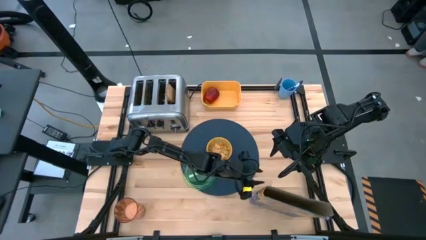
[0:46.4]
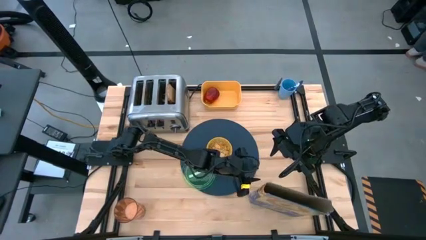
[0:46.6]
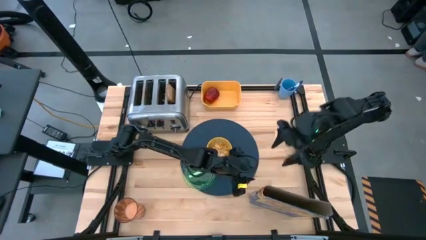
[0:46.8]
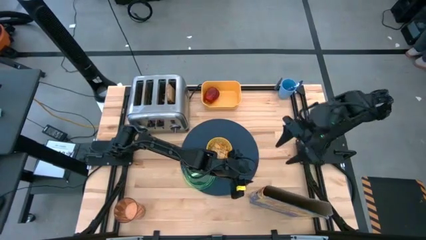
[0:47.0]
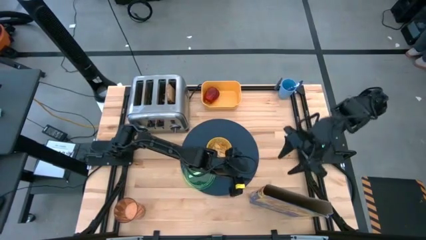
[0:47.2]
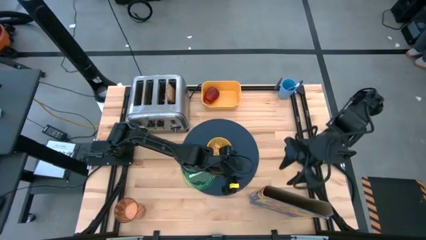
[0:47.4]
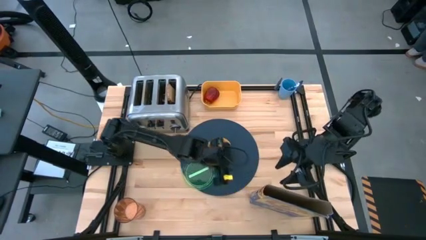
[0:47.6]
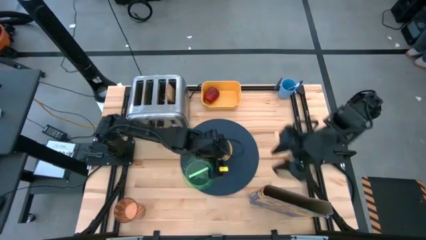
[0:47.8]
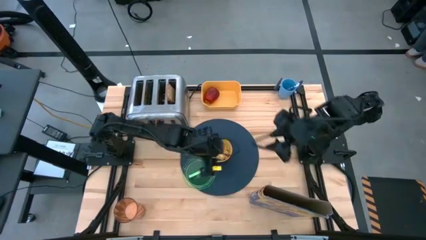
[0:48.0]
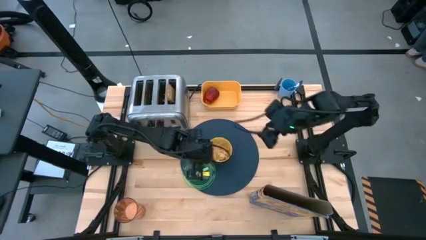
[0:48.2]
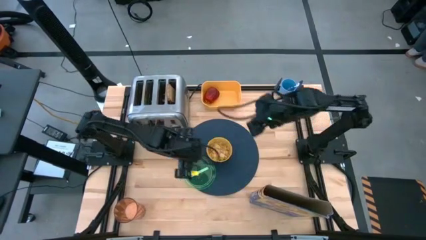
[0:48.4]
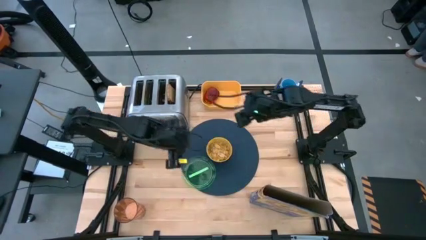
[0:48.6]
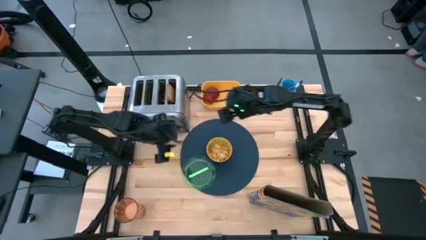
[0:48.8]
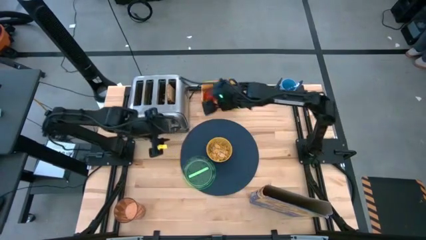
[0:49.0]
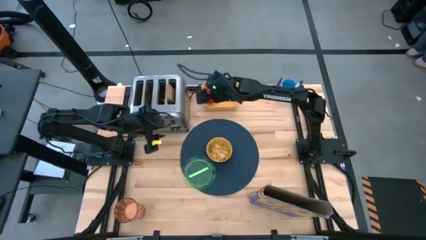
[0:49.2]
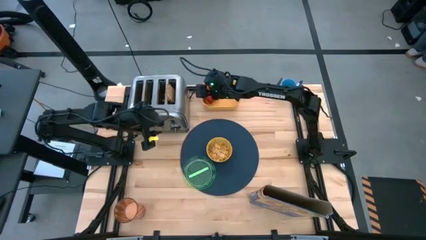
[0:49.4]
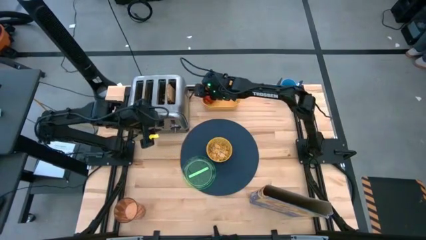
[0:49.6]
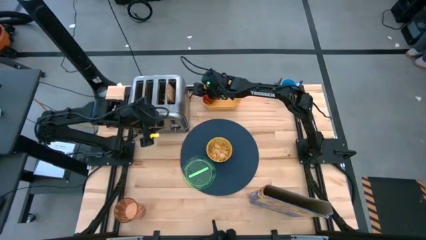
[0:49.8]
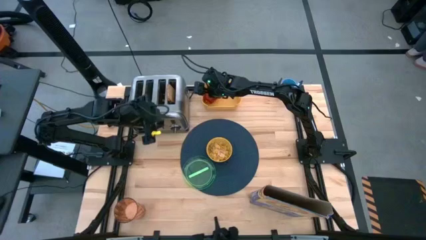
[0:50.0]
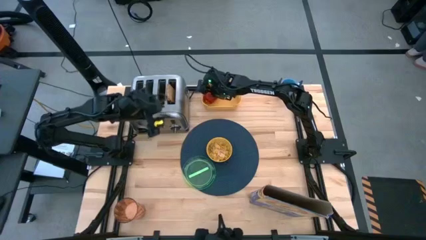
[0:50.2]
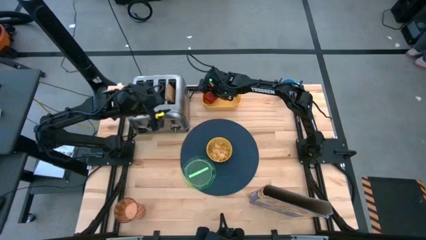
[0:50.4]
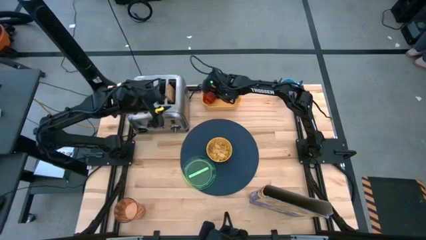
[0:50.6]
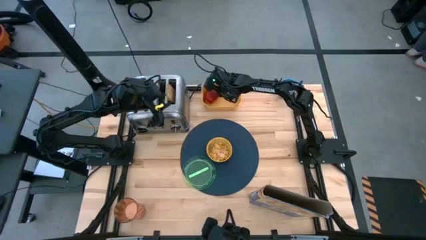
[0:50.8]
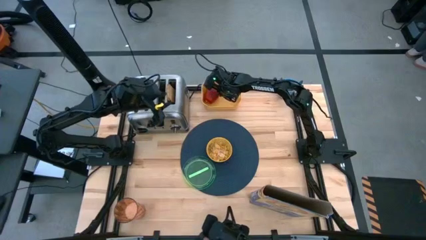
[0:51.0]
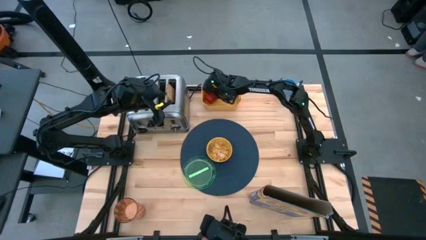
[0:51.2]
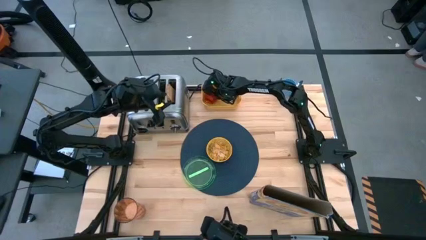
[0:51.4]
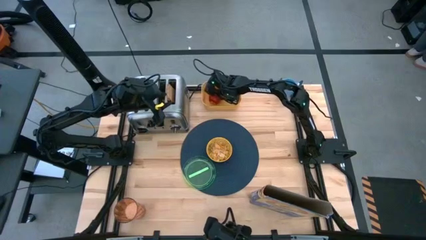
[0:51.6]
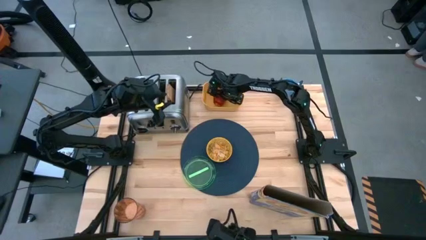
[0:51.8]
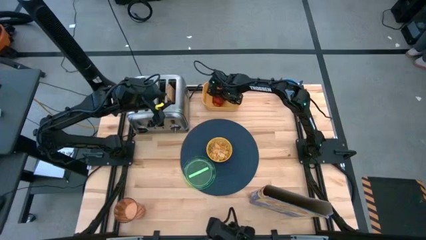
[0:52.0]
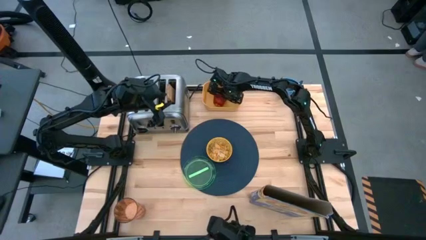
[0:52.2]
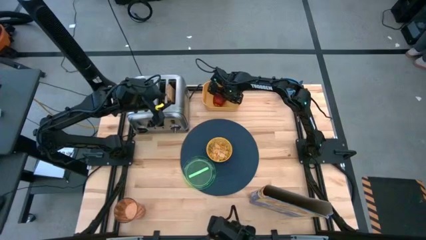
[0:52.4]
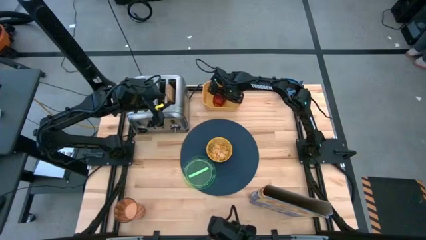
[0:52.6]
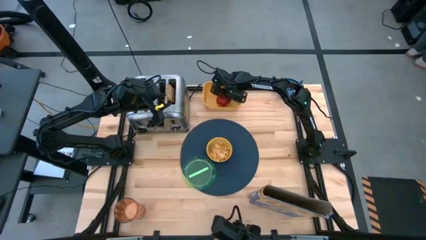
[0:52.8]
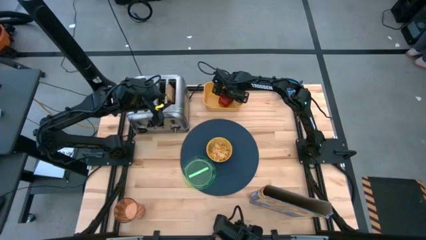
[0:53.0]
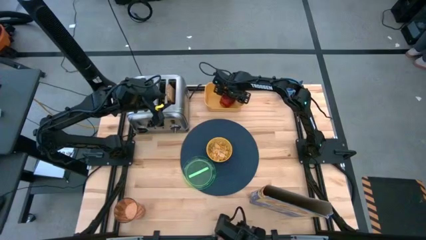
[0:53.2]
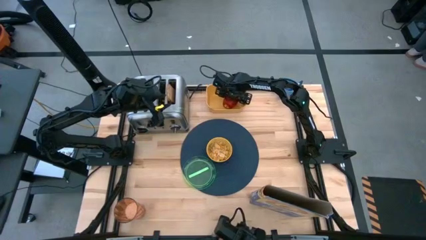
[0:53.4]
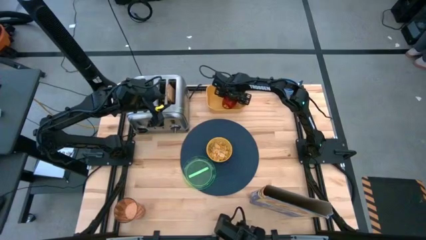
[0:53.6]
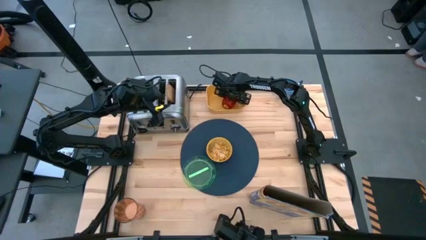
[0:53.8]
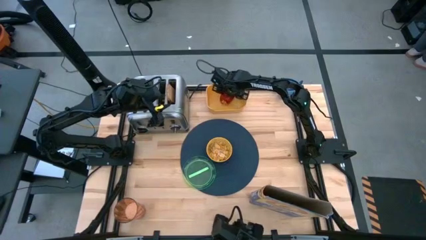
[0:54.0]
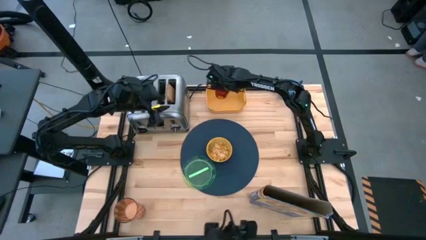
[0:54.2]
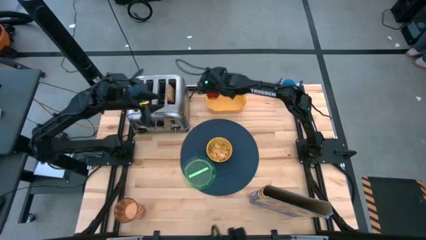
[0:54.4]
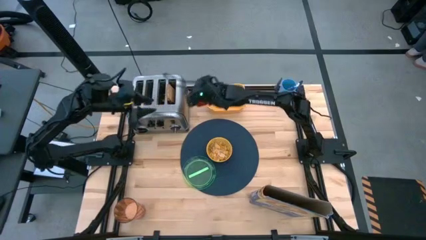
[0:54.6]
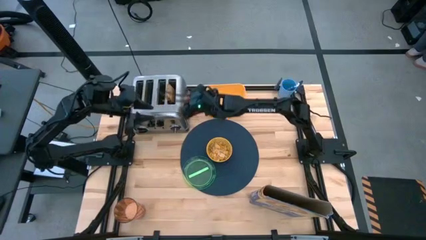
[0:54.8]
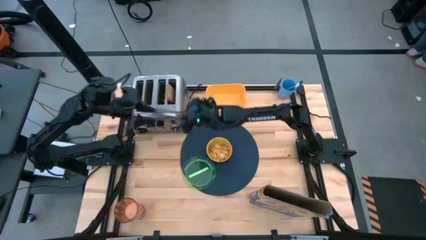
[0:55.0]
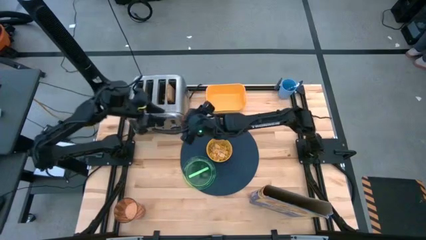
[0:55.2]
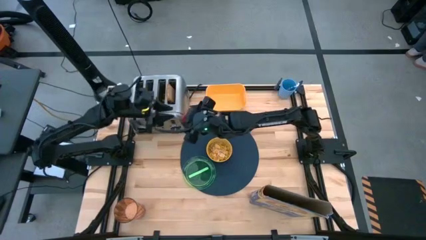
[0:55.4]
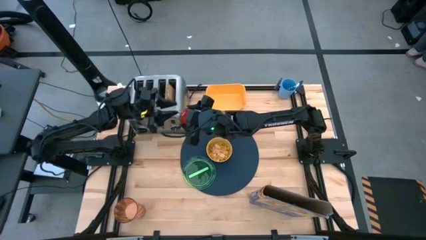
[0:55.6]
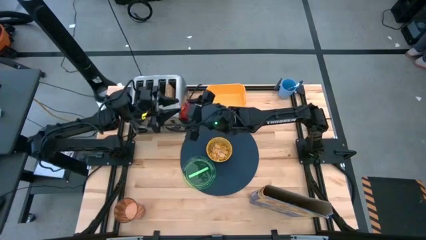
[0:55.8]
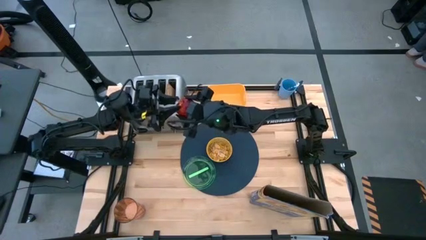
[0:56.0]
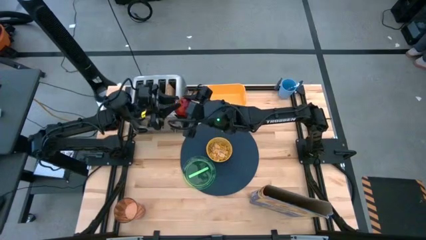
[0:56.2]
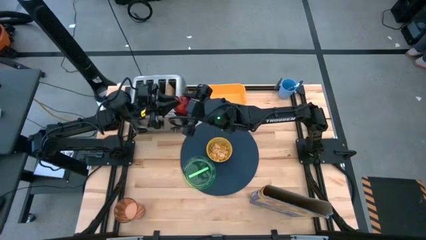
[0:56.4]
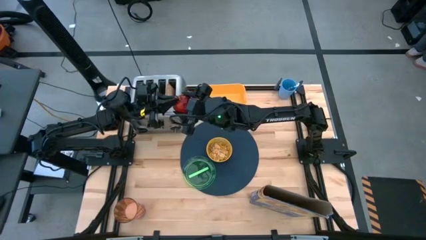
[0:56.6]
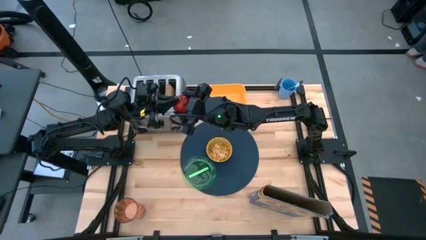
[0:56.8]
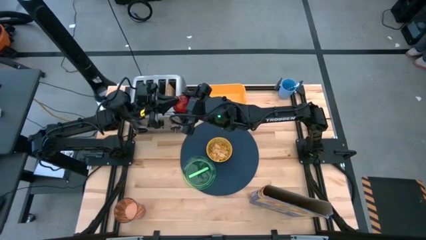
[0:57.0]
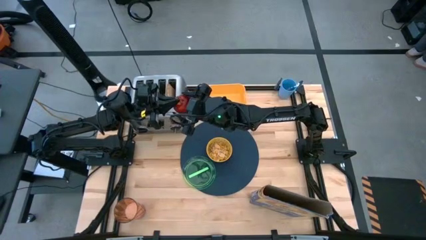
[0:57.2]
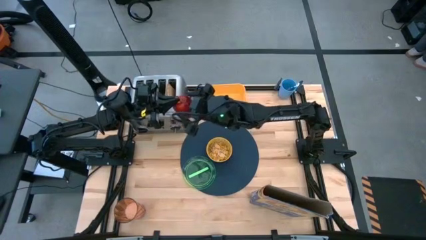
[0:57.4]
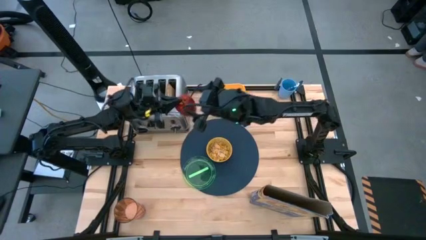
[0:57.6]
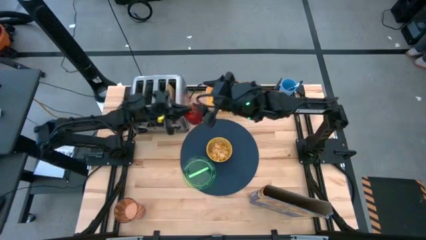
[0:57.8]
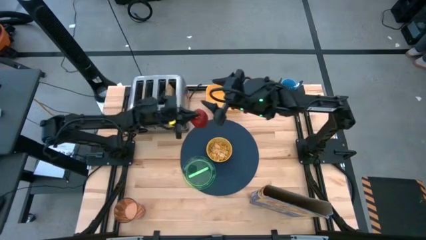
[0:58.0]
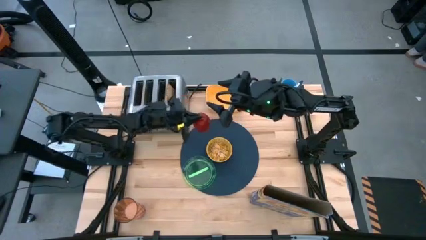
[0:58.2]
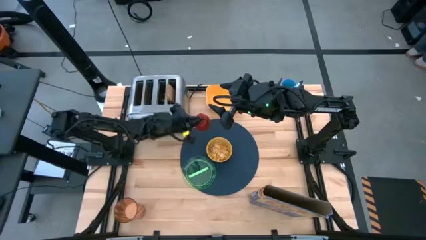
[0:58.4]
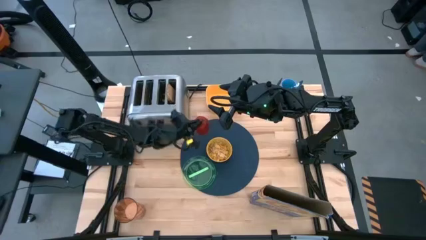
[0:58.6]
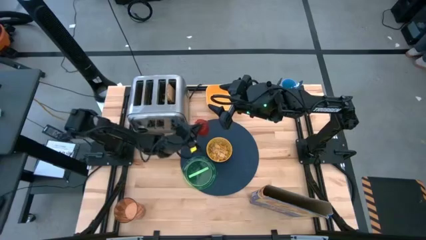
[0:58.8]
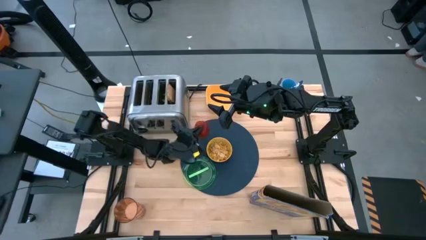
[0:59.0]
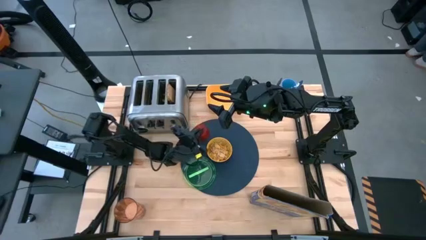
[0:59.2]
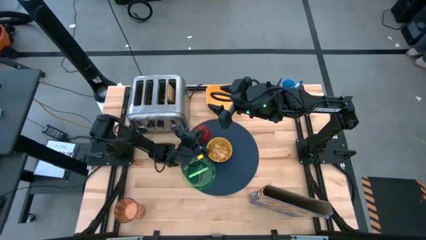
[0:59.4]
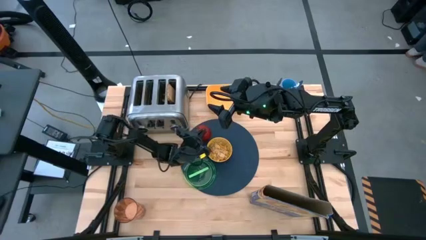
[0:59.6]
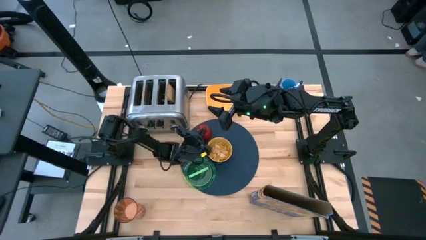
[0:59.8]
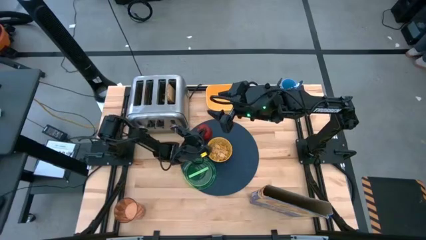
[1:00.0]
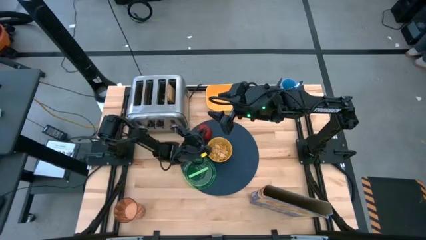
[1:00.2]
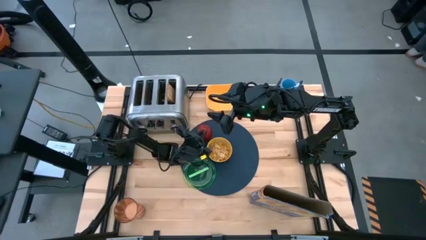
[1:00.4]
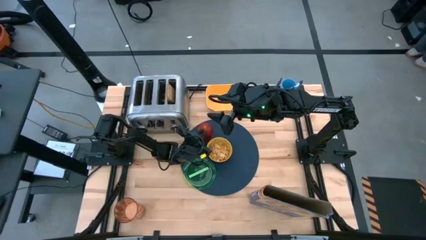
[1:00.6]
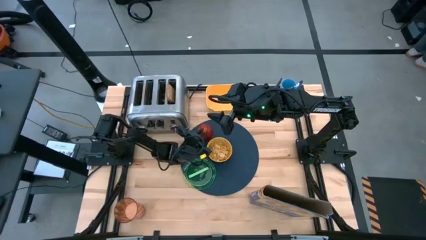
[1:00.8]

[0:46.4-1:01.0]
Task: Arrange a breakfast setting
Put the red apple on the table mat to the top left of the yellow bowl

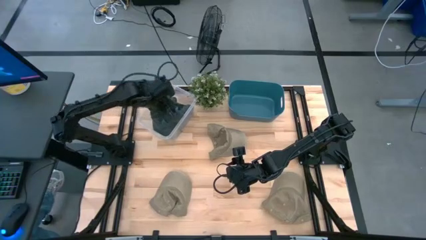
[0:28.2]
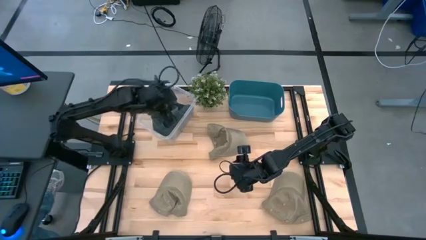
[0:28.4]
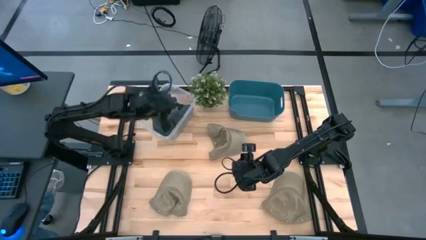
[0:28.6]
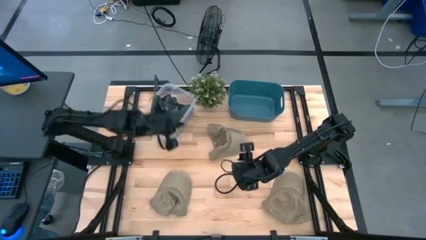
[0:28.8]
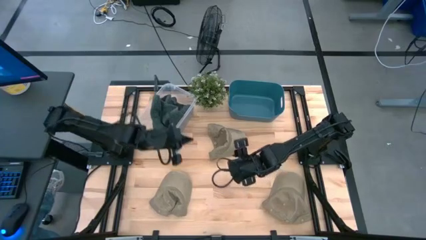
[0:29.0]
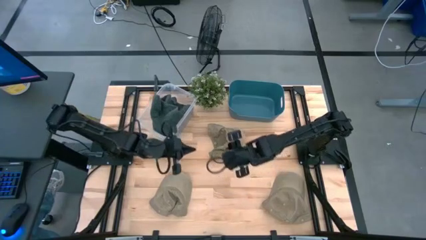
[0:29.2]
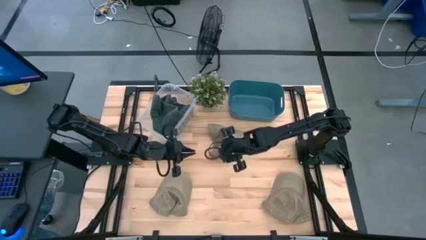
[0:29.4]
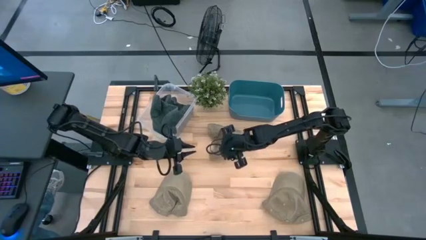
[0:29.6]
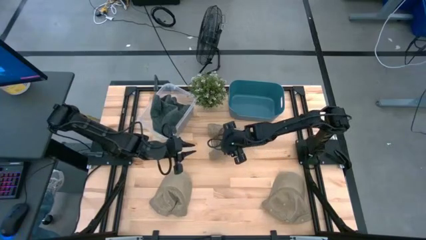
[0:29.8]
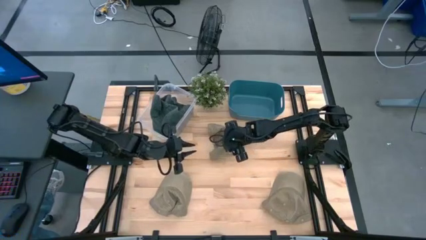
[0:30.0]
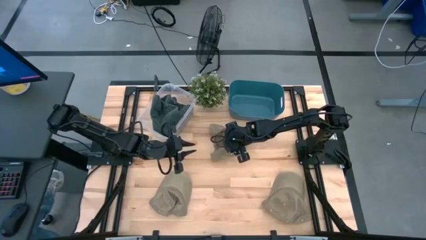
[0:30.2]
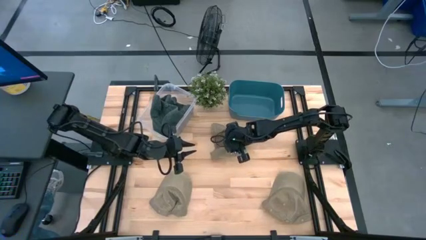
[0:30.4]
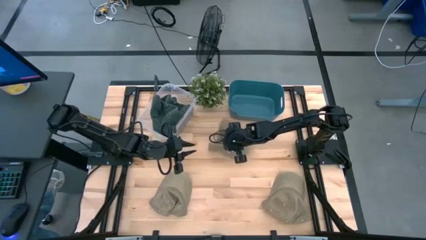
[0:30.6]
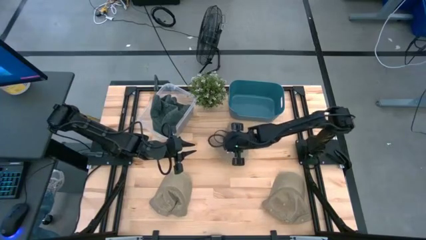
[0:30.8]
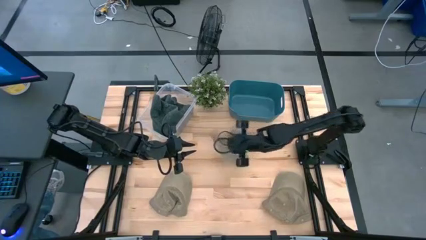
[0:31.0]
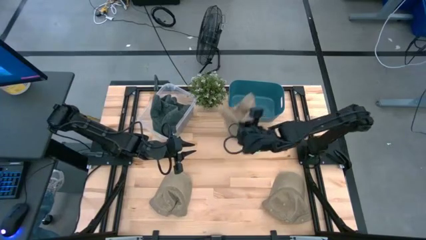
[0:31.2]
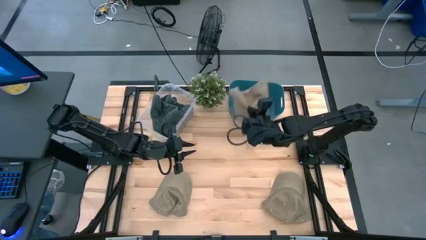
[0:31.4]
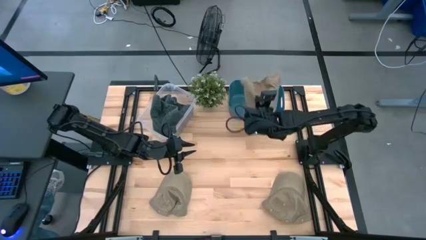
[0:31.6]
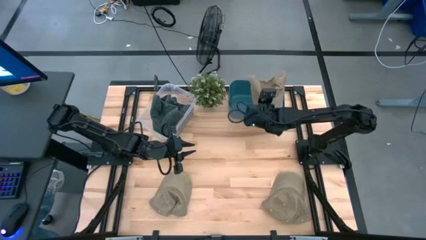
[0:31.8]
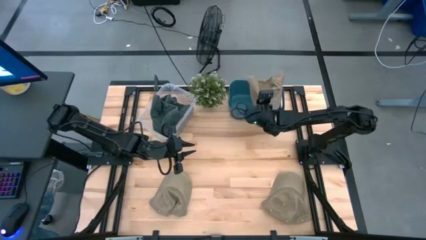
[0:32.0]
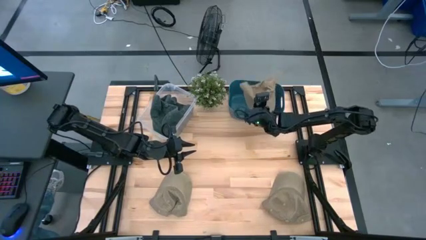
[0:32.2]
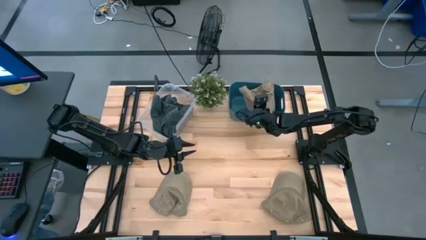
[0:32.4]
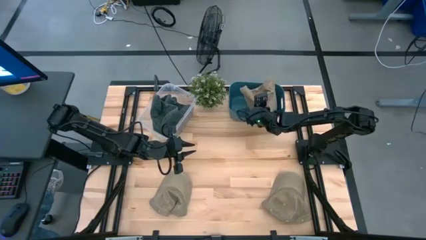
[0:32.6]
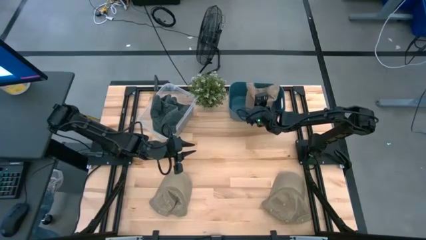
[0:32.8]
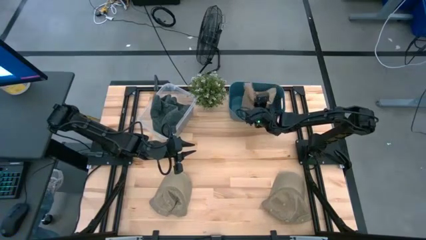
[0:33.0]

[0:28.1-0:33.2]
Task: Pick & Place hat
Put the top middle brown cap into the blue bin
